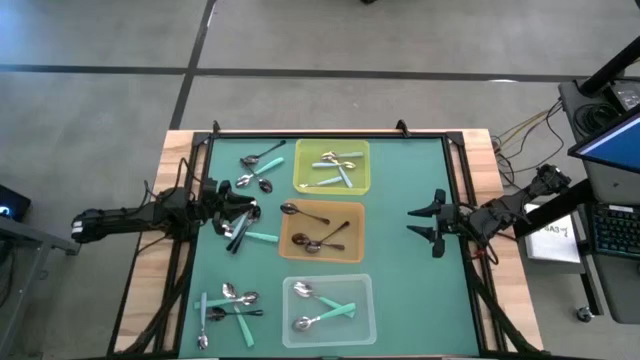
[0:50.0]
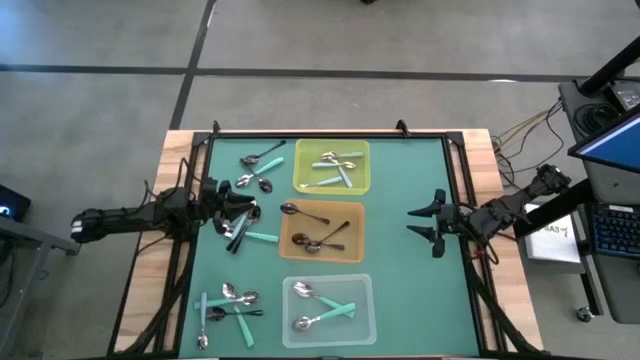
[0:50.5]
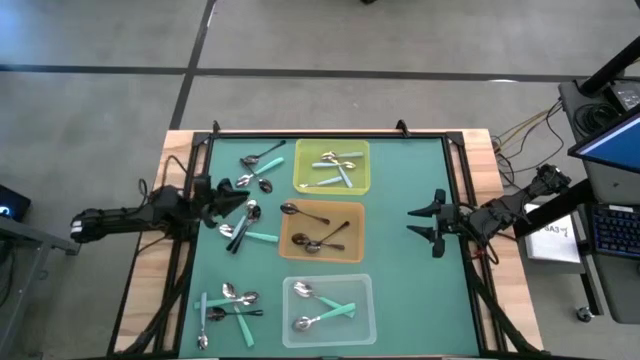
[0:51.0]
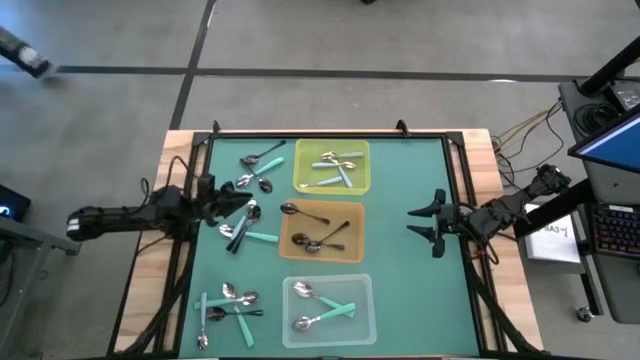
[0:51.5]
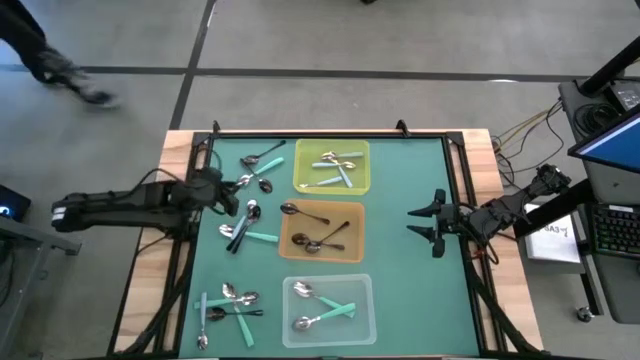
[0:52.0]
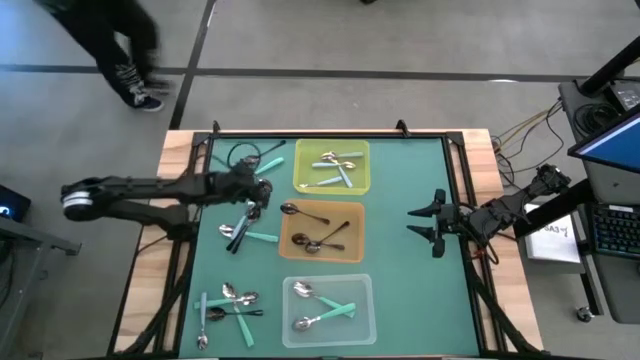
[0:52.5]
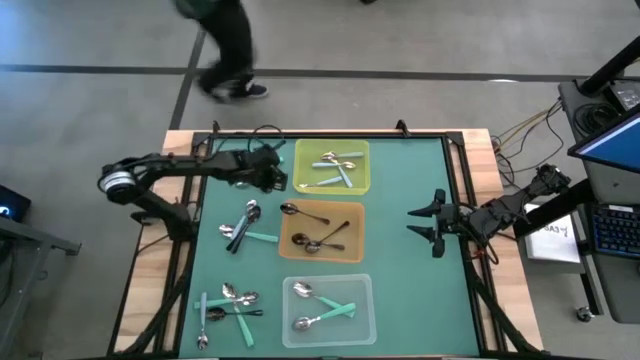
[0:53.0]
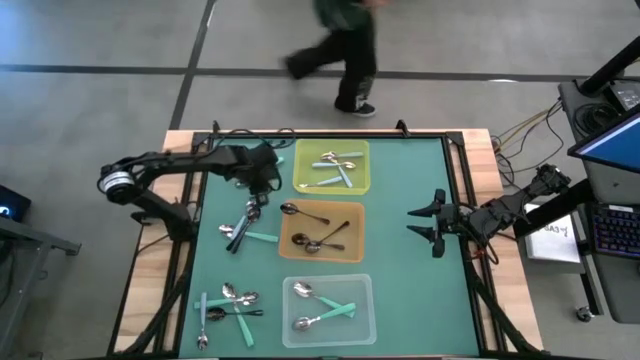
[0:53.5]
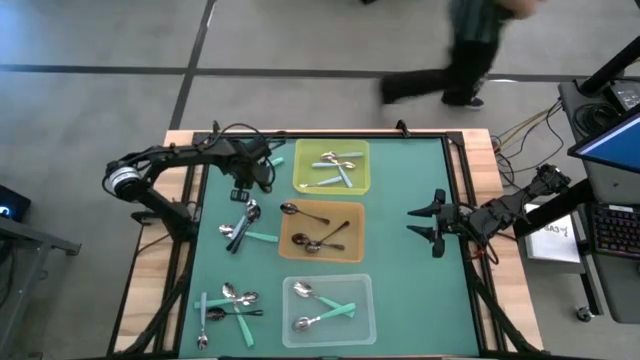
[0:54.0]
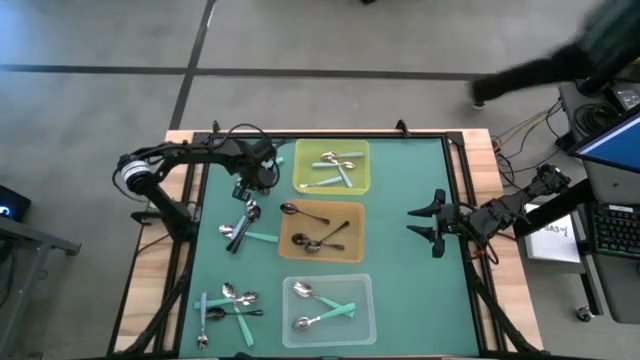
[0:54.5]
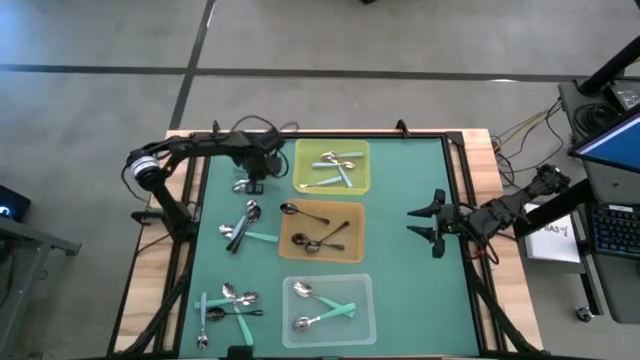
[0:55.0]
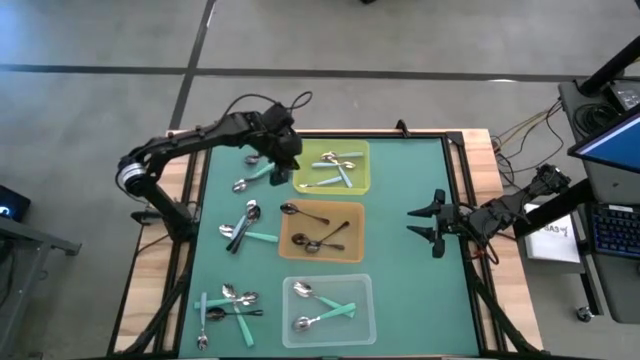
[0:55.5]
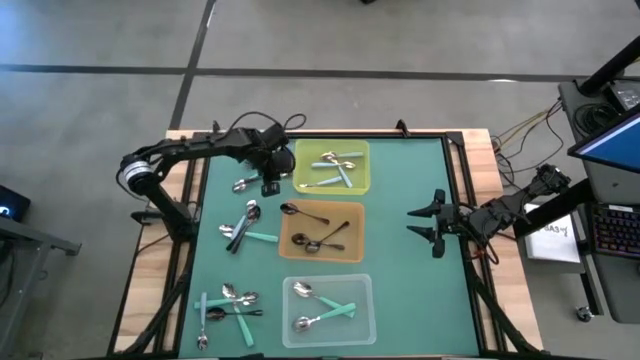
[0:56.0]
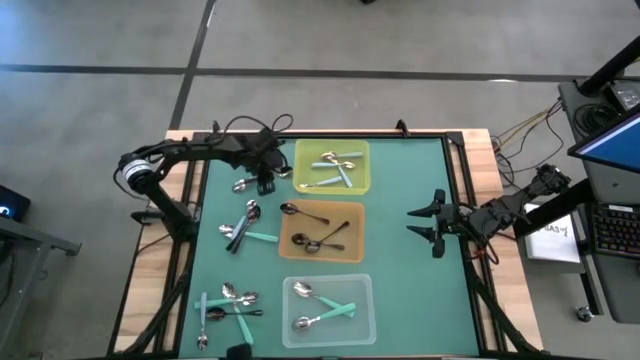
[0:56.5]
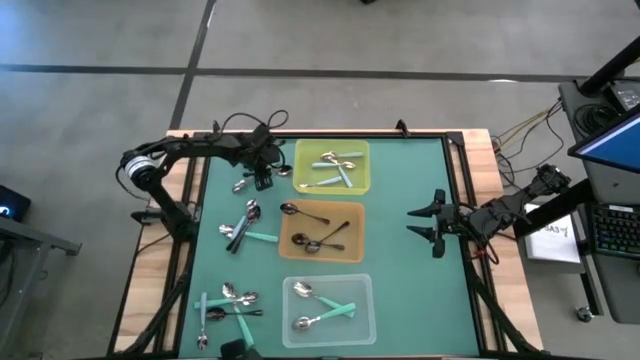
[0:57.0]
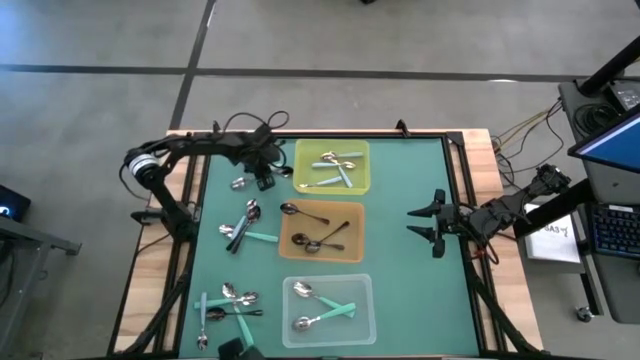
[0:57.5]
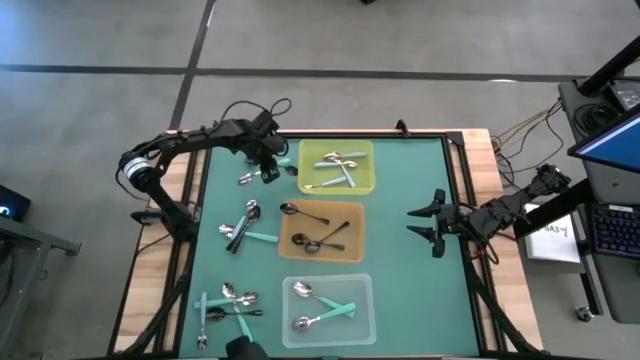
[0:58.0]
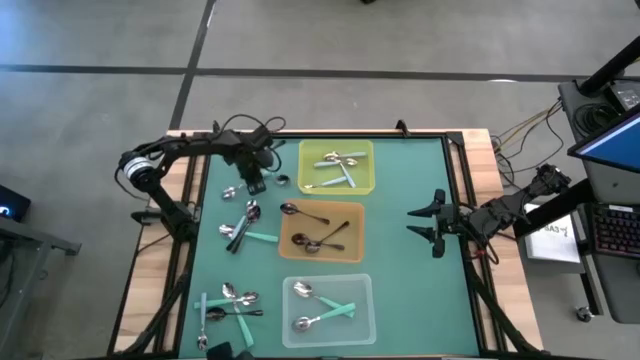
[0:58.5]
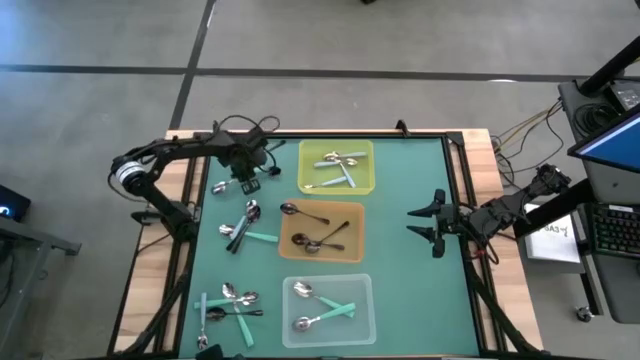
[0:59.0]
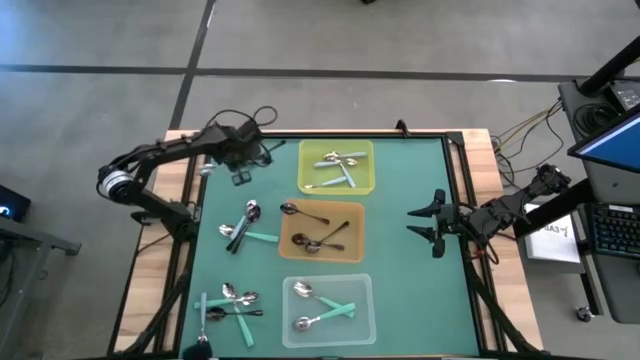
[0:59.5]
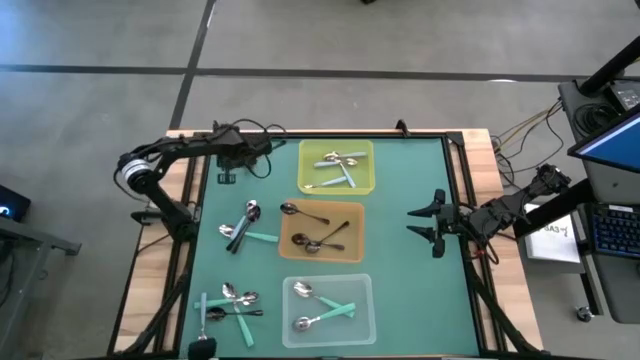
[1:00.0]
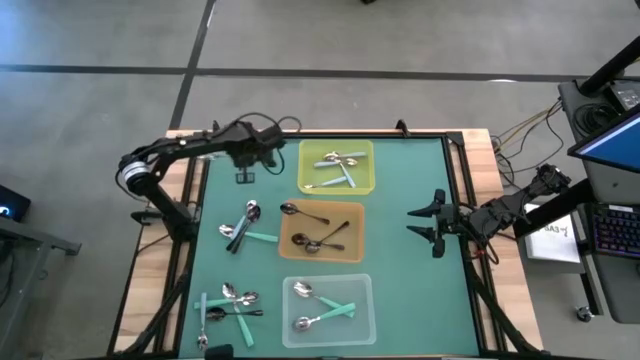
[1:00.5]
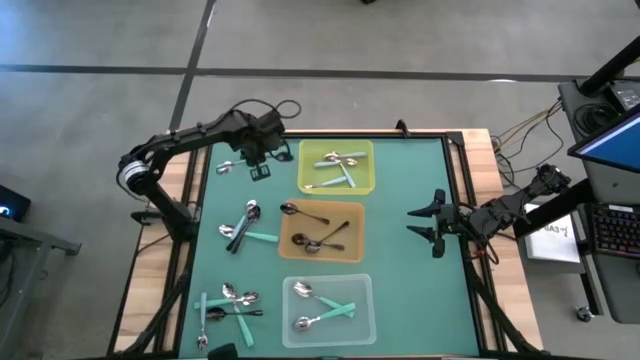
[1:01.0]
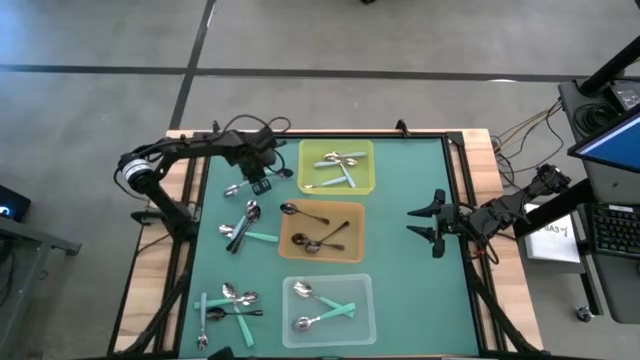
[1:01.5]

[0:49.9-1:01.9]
Task: Sort silverware by color (type)
Put the black spoon into the orange bin

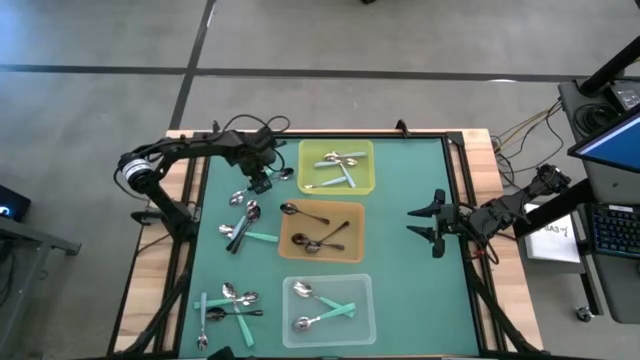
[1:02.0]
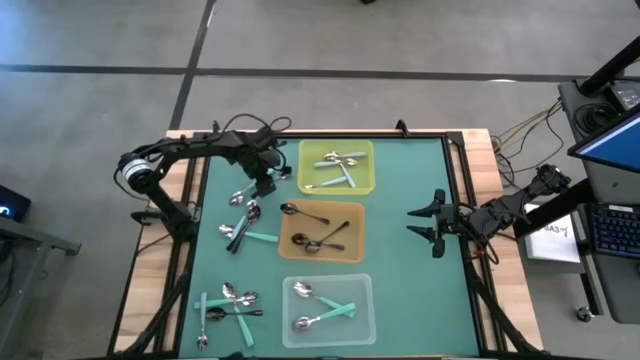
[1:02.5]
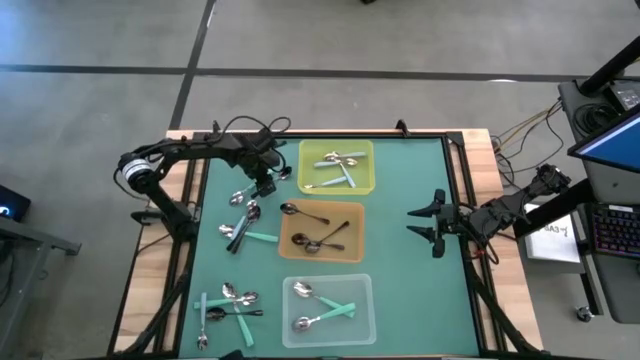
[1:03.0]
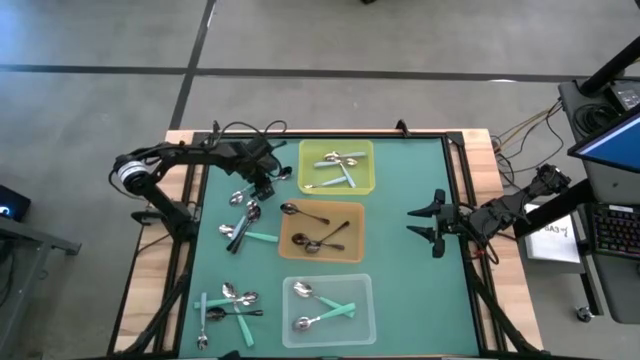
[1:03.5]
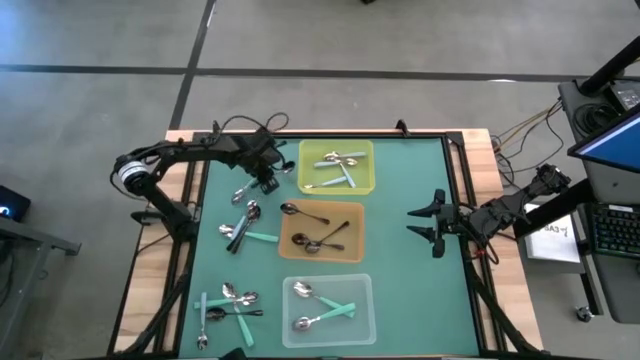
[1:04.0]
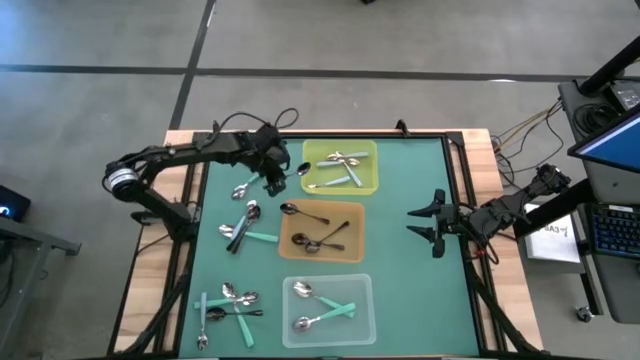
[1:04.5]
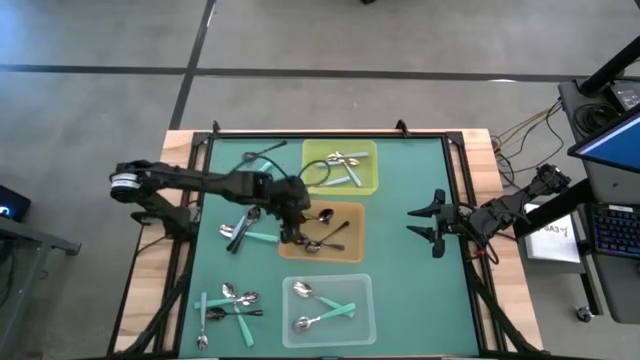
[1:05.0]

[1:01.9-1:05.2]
Put the black spoon into the orange bin

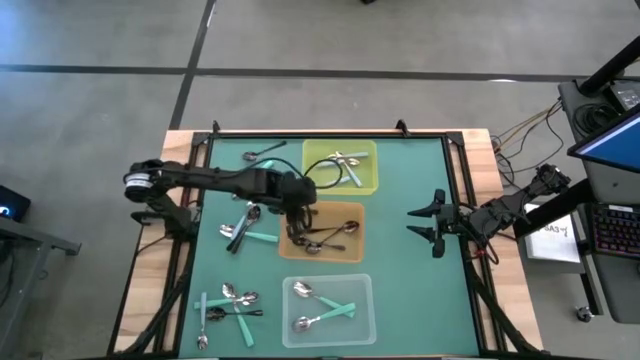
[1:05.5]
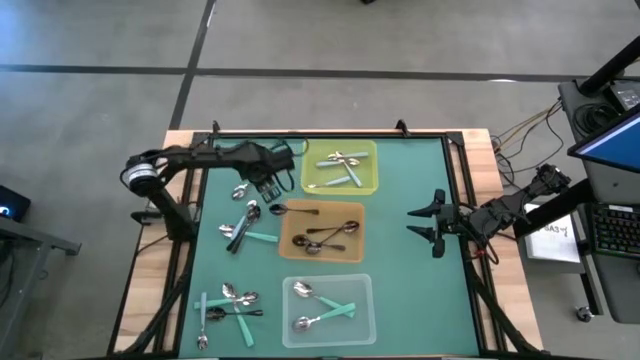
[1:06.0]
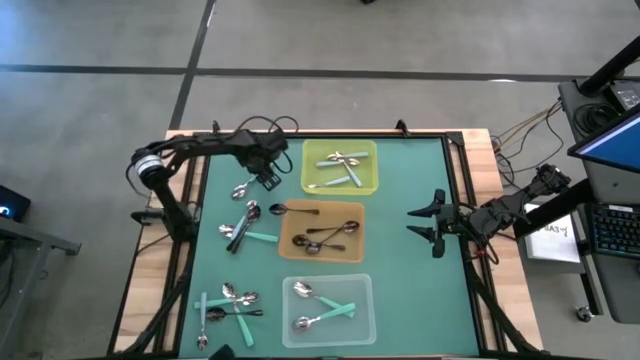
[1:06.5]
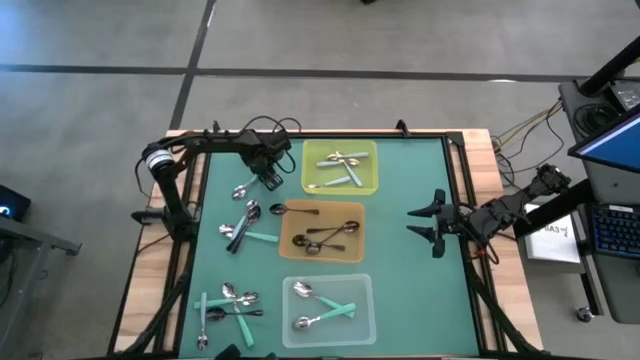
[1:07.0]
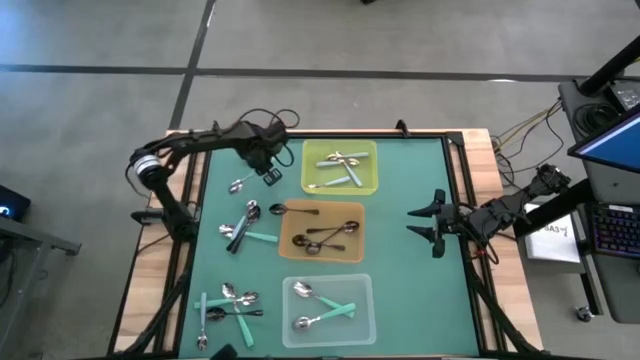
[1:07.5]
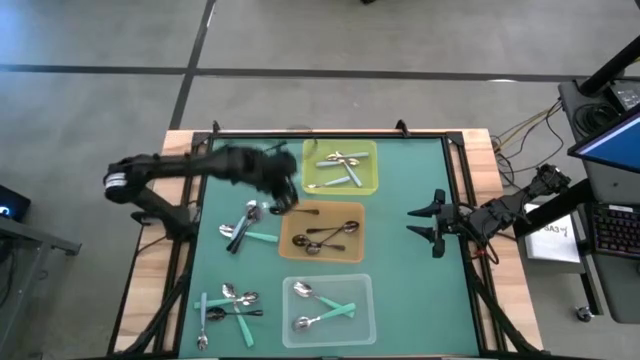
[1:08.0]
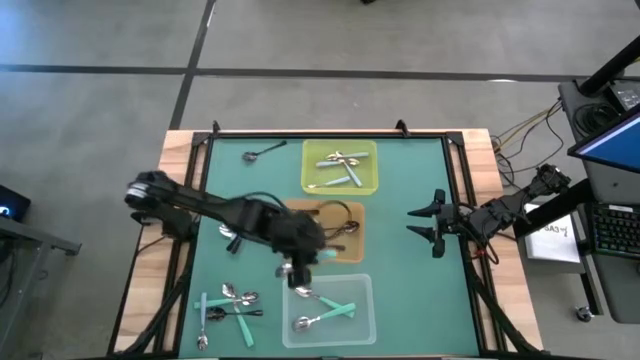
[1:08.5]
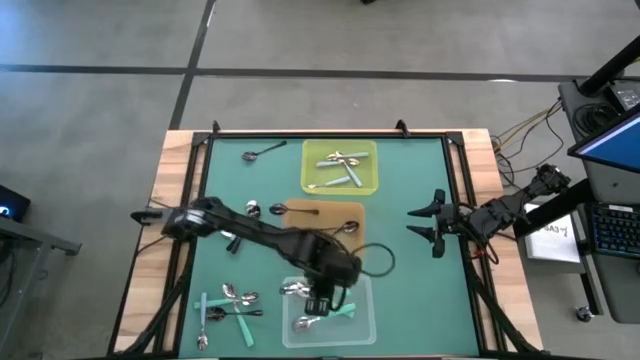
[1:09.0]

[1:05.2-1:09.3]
Put the green spoon into the transparent bin

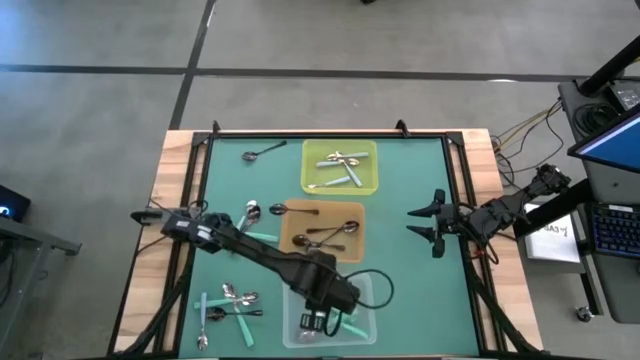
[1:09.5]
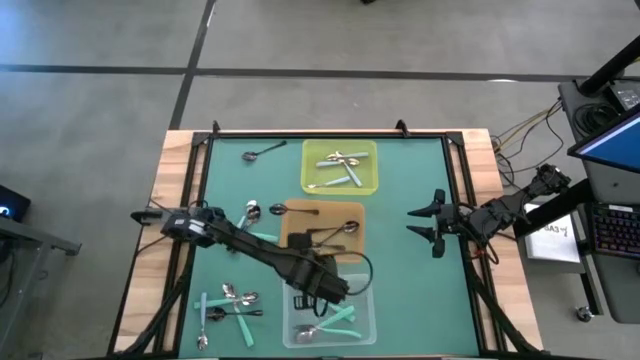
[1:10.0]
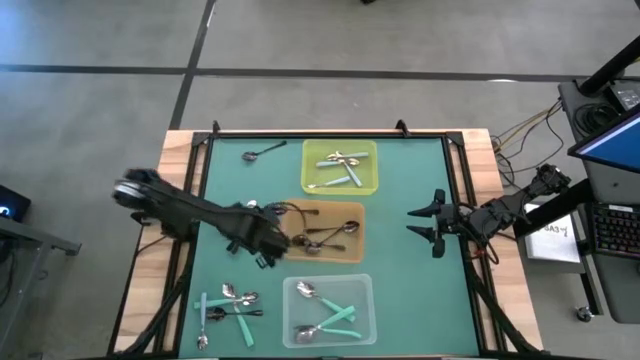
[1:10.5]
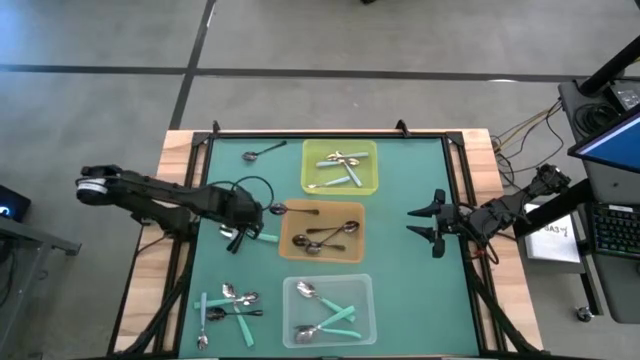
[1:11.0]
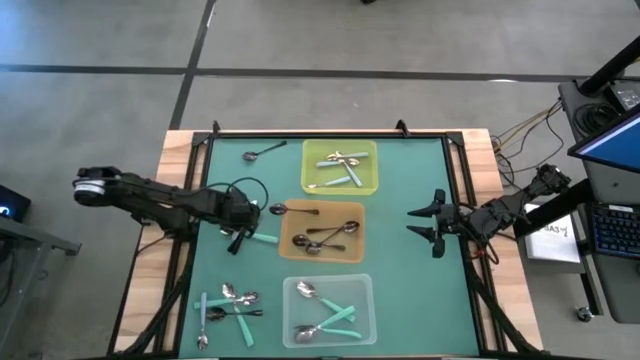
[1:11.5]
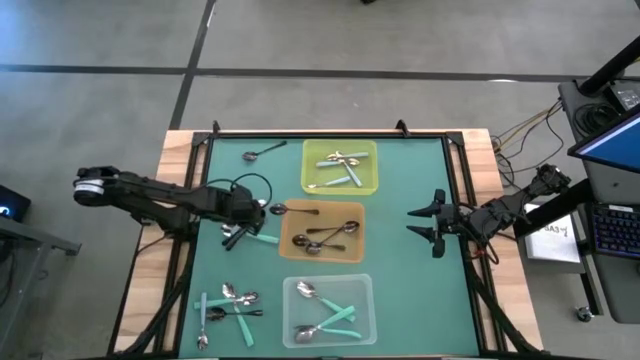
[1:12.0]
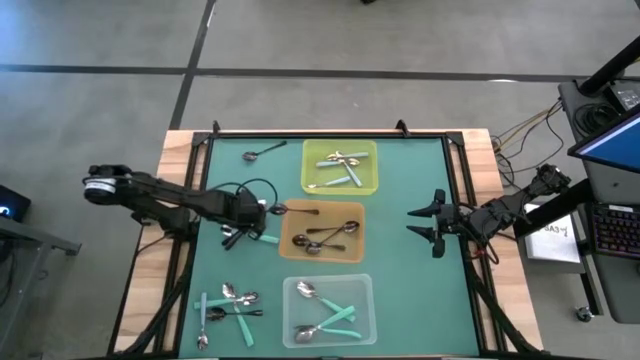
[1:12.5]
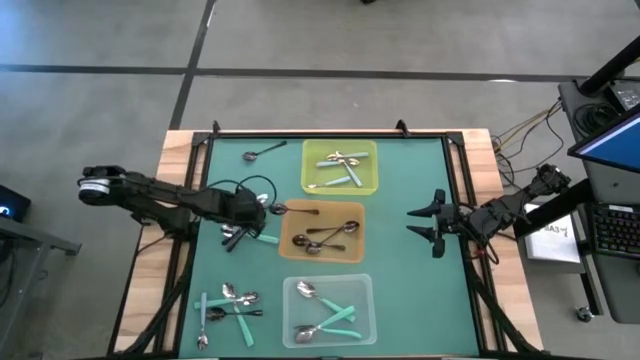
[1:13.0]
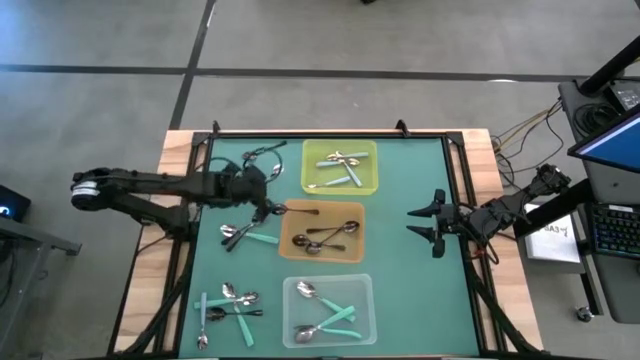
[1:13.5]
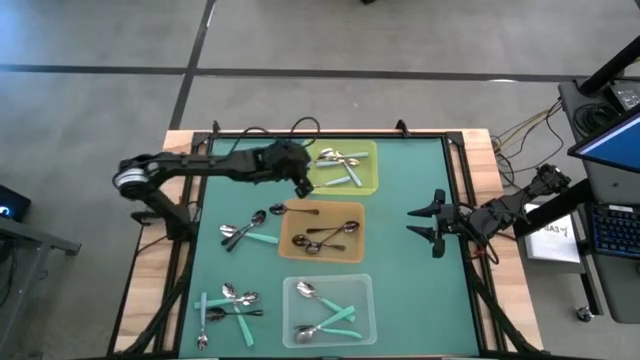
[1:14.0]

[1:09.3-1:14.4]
Put the blue spoon into the yellow bin
